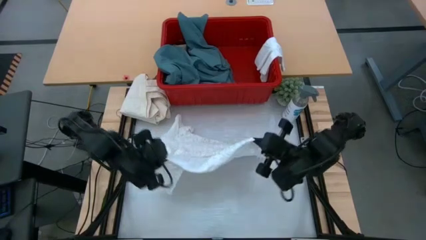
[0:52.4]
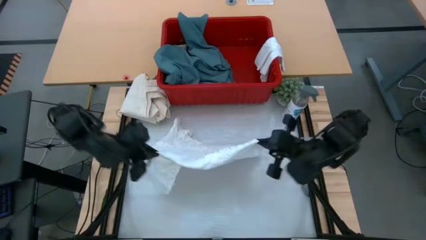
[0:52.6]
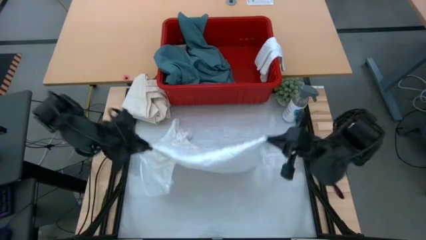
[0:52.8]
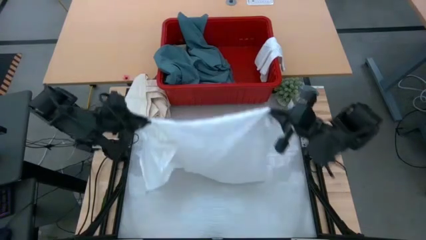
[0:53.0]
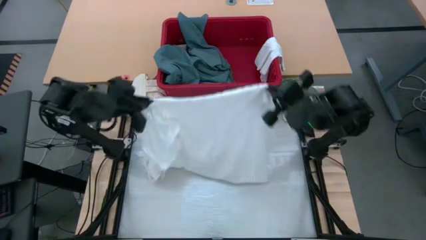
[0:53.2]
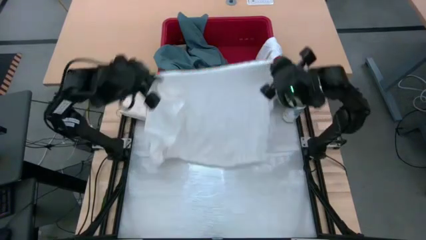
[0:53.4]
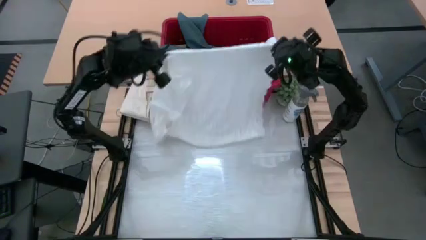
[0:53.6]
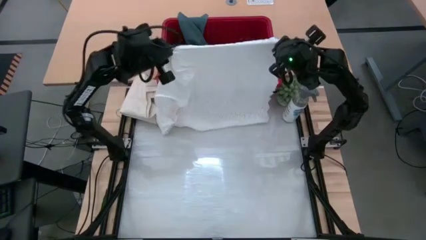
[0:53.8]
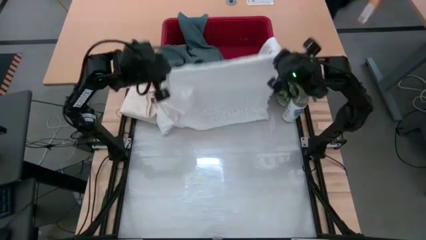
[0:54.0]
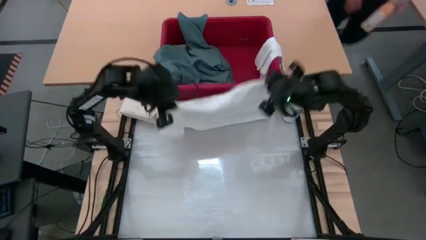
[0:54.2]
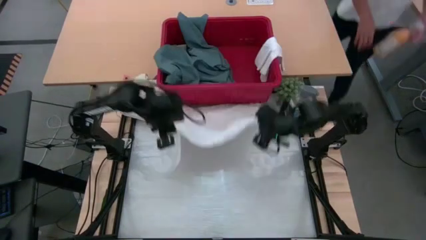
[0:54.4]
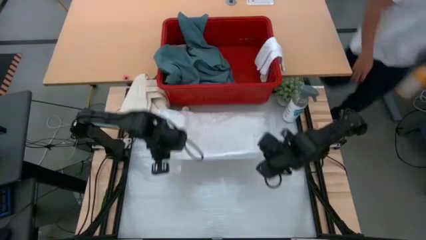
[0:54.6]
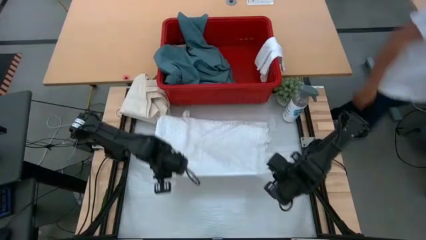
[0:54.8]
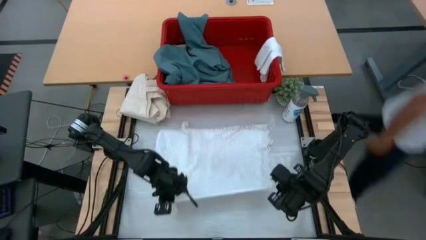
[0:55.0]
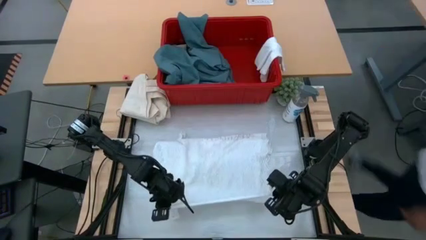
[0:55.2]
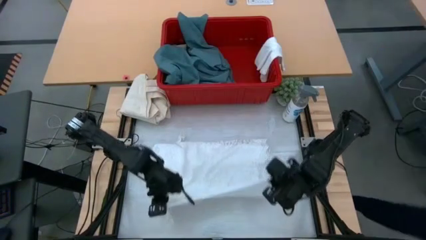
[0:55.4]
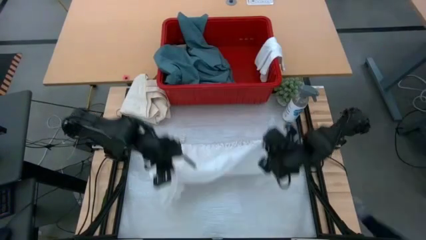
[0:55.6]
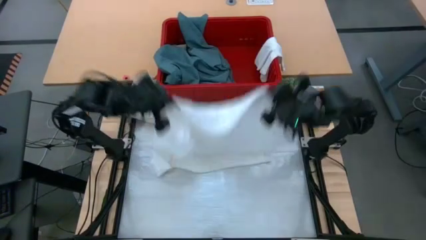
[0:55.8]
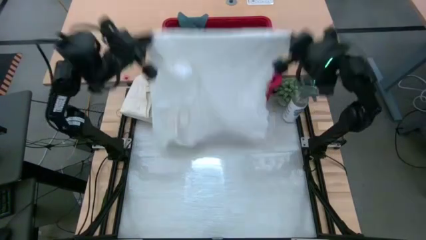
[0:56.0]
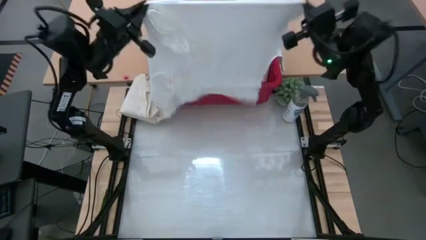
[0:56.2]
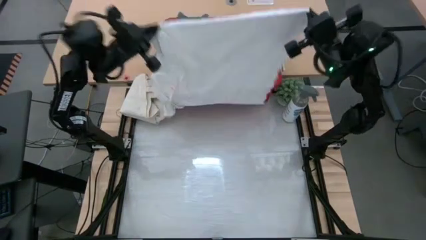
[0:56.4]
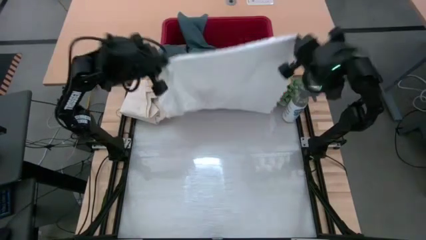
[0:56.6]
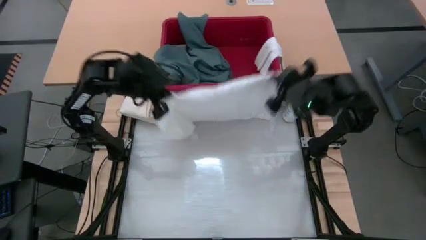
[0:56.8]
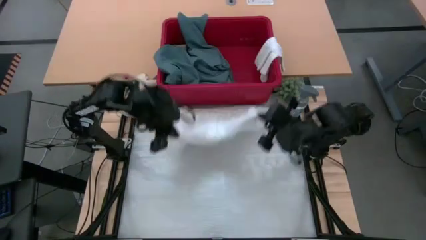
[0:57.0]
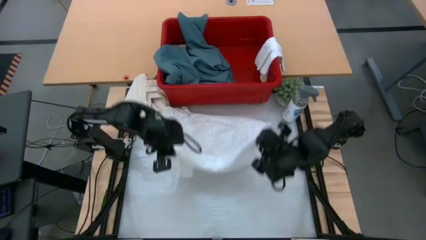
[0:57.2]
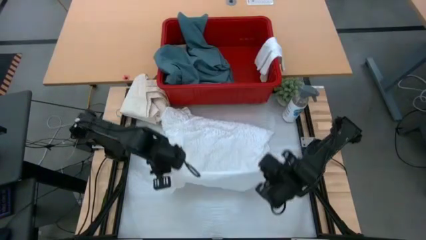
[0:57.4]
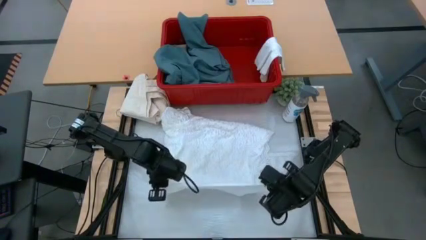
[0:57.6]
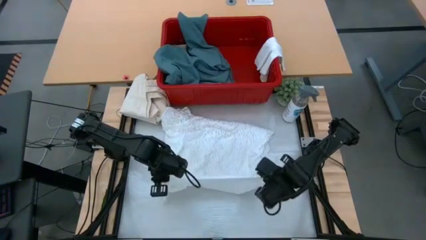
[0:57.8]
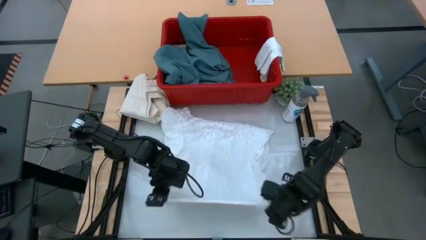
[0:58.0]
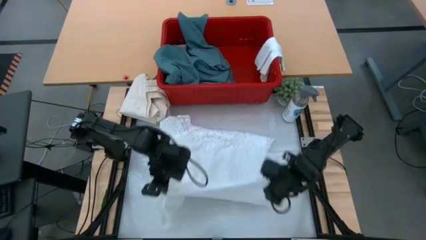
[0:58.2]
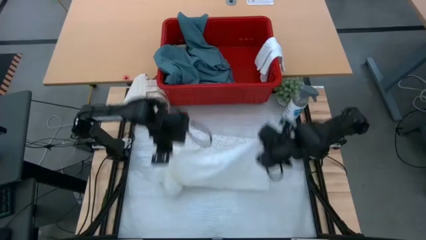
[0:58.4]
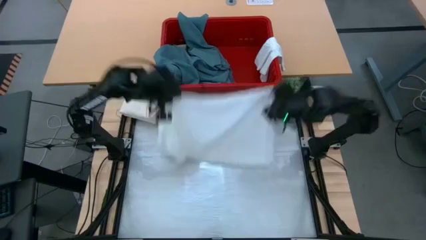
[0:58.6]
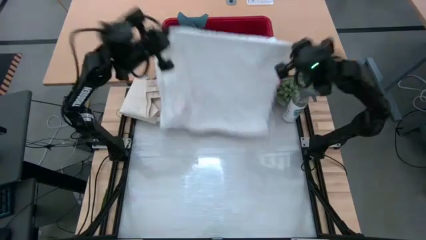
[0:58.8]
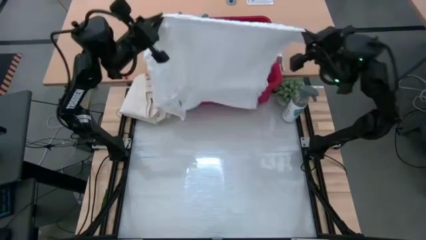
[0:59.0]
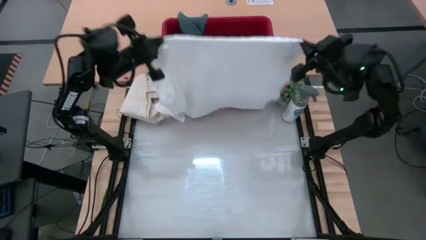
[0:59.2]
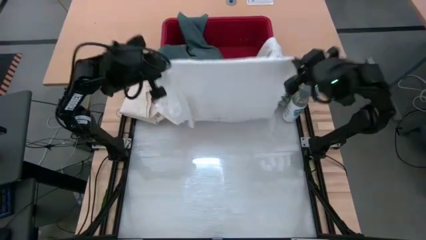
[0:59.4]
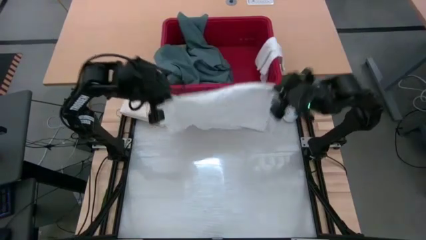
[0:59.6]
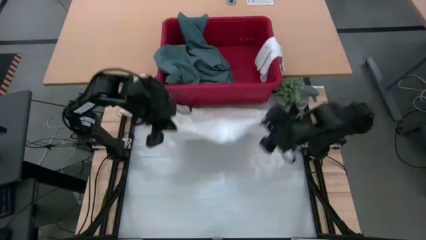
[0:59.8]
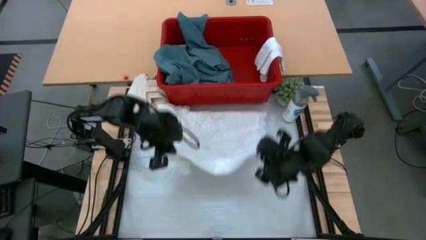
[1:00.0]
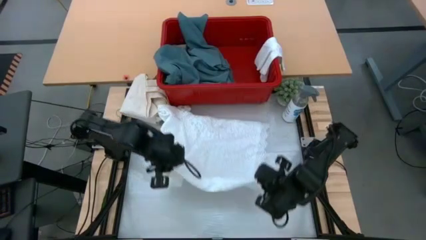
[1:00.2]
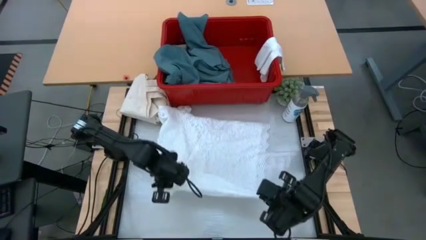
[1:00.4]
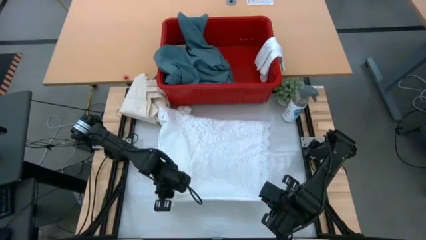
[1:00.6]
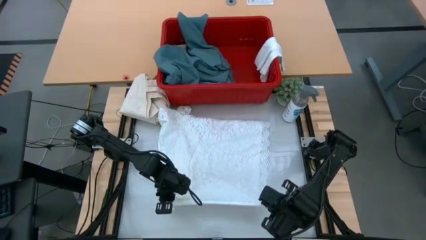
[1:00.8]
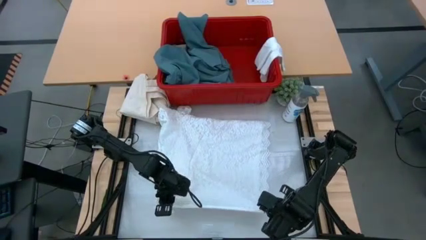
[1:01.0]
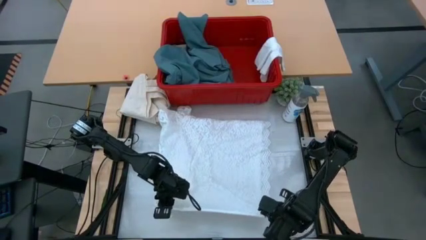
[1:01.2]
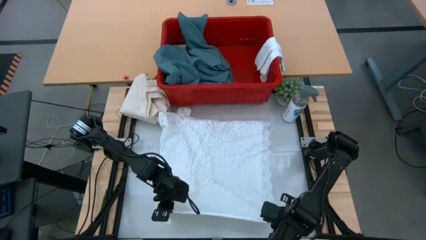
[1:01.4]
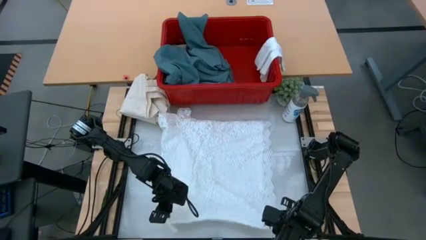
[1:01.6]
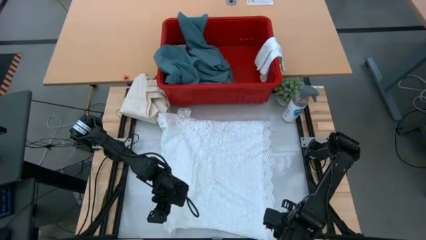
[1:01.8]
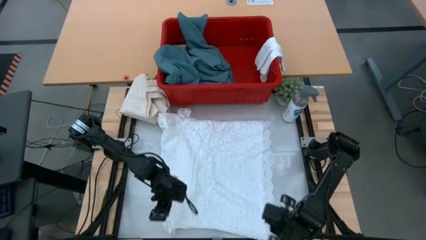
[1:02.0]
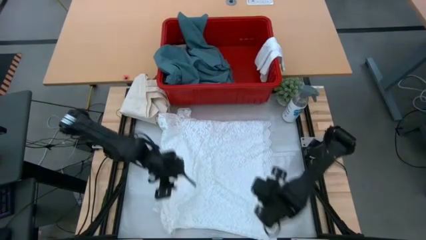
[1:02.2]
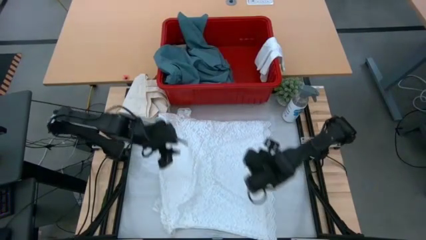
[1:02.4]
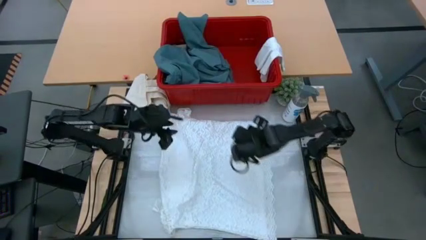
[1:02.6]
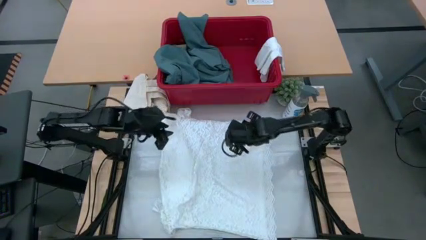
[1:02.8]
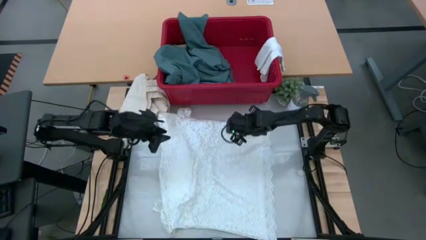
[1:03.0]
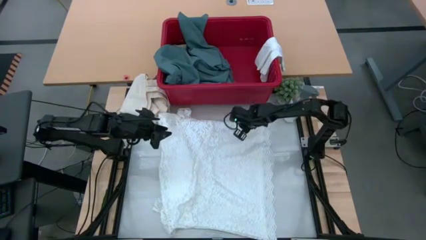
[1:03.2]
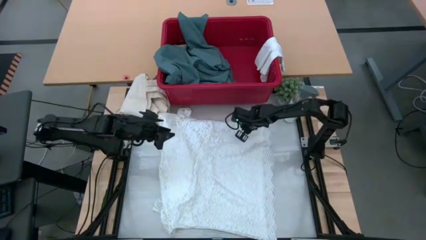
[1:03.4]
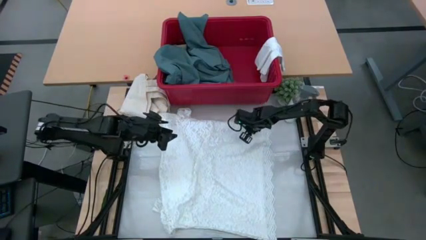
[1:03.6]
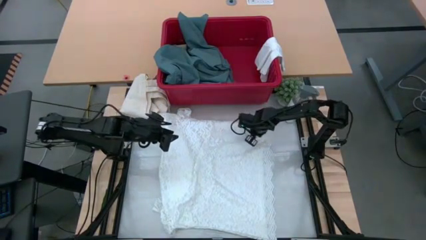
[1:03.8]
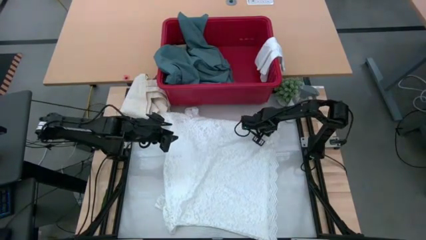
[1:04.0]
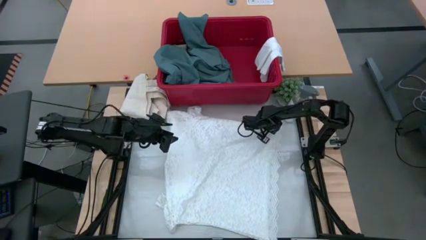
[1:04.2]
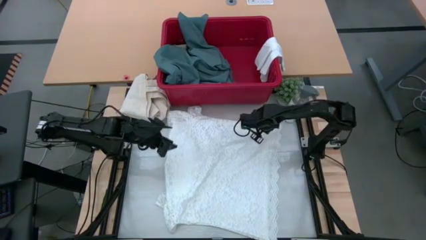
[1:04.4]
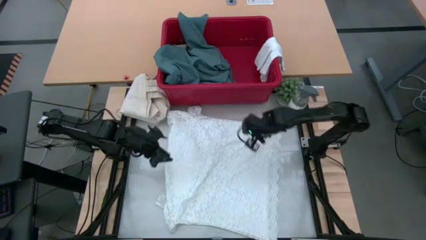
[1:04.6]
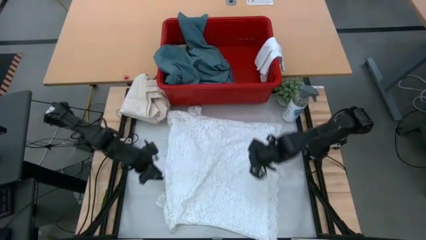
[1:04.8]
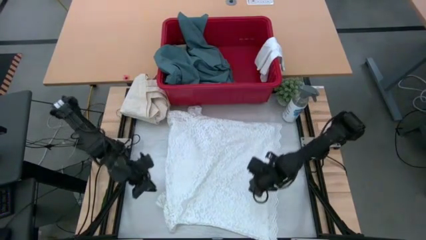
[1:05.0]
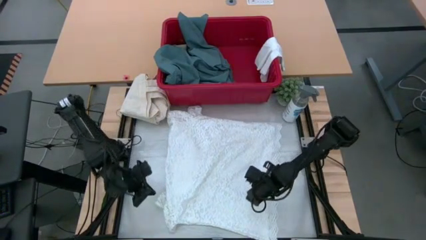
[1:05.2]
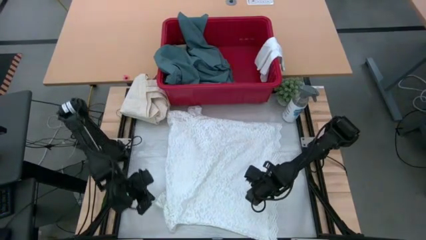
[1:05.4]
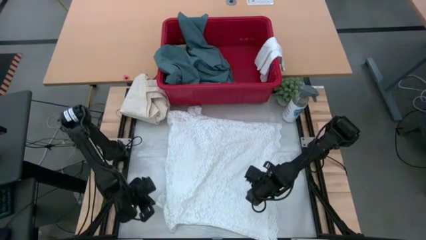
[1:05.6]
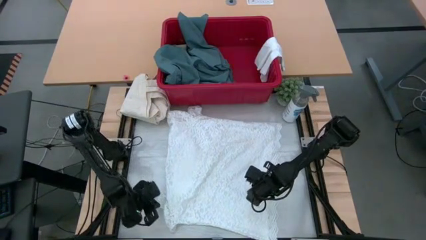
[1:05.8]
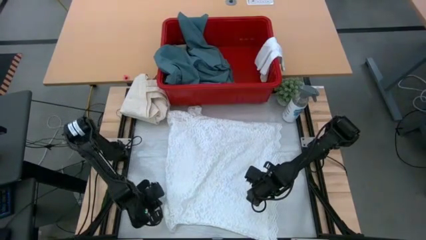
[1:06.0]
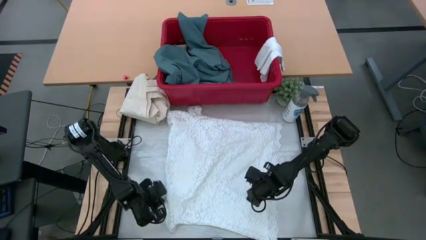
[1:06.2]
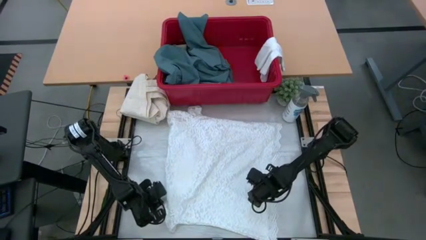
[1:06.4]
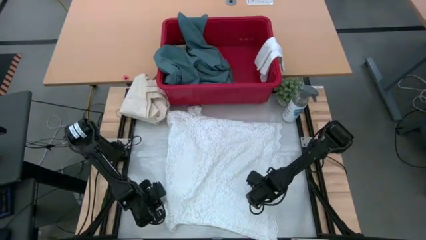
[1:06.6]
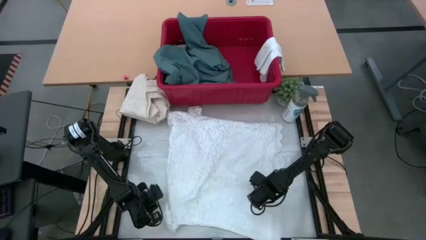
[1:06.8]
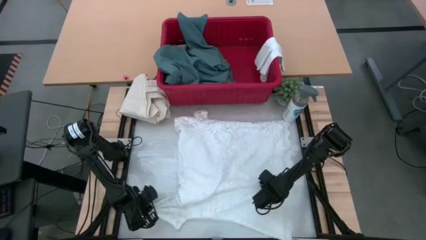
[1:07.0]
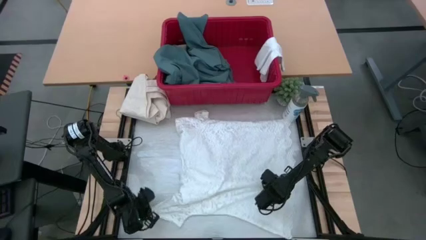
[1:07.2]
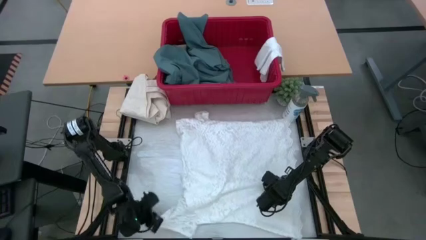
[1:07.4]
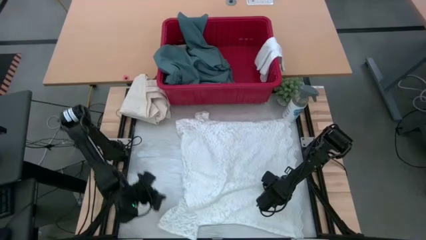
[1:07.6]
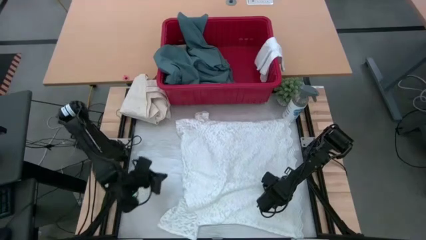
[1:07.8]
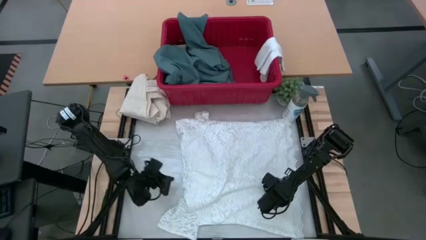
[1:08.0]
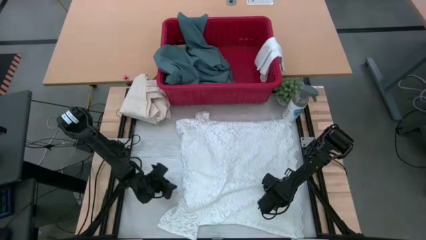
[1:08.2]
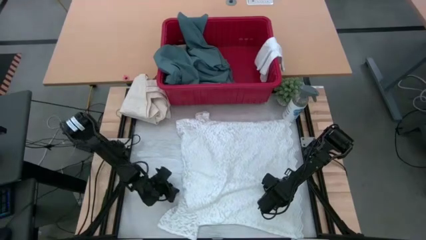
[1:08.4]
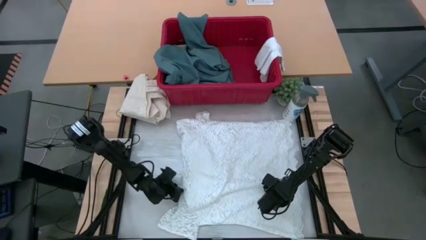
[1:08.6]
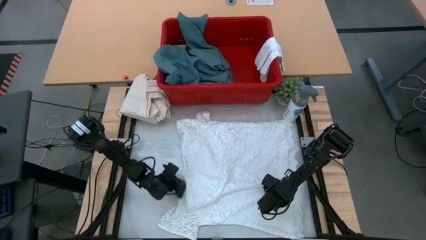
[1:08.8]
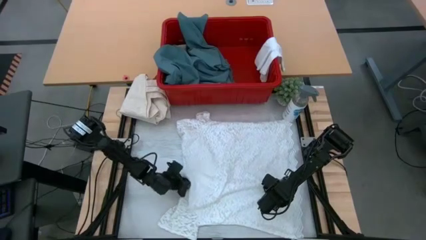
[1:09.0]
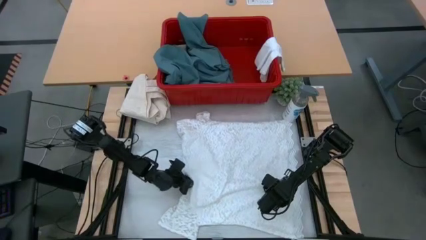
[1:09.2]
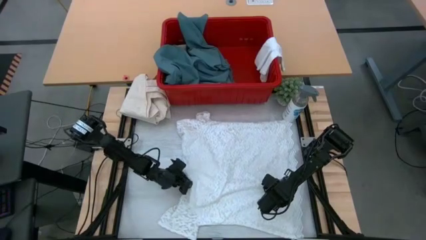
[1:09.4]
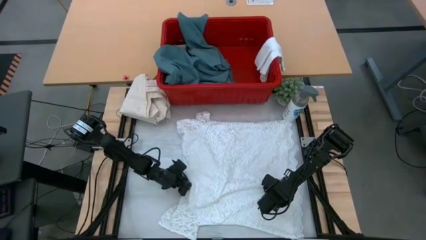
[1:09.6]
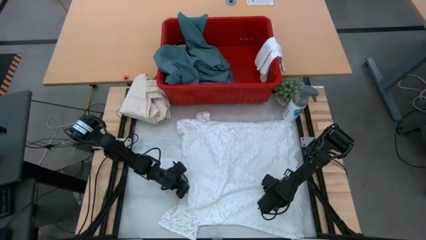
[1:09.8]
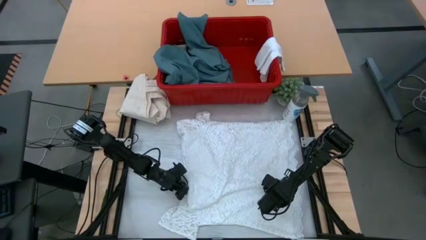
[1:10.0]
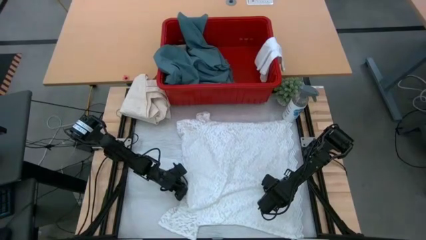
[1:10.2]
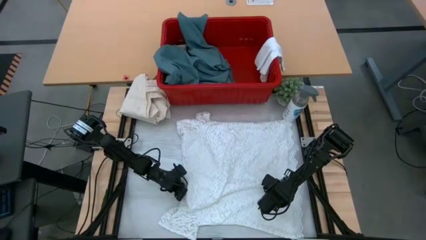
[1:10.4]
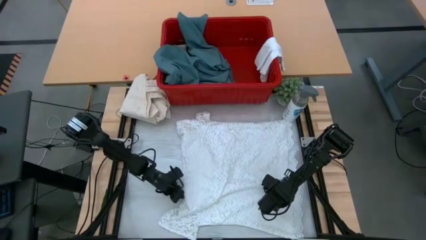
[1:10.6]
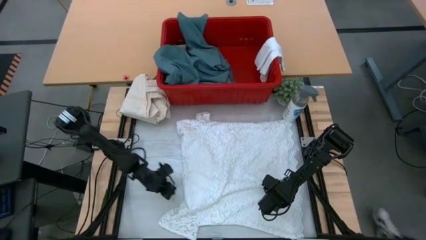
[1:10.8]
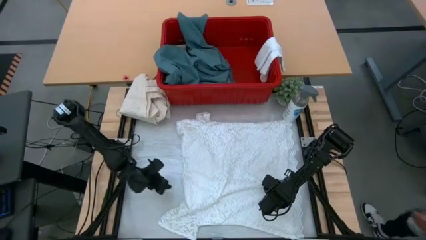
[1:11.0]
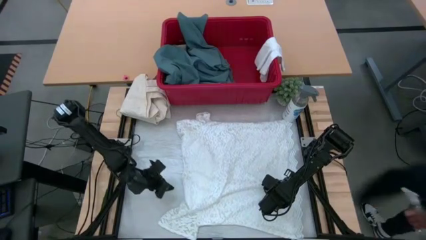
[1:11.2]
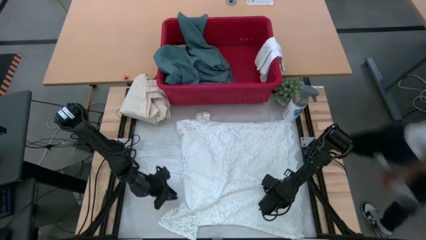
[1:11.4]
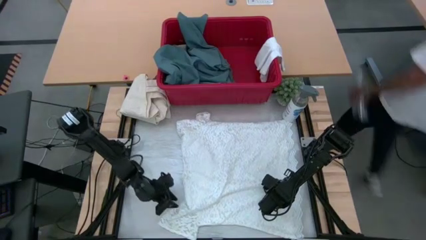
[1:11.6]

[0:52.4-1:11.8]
Task: Fold Laundry from Bin
Fold the white shirt
